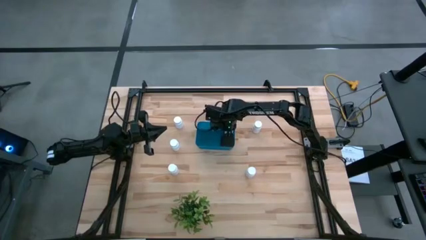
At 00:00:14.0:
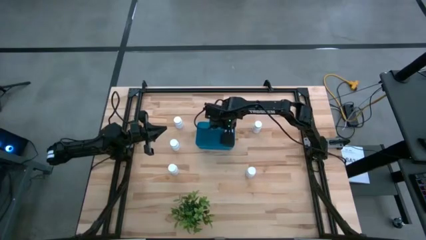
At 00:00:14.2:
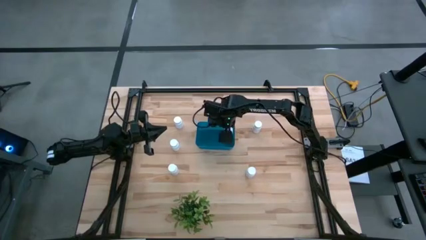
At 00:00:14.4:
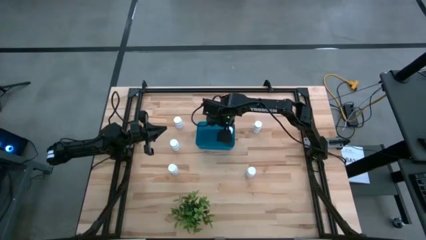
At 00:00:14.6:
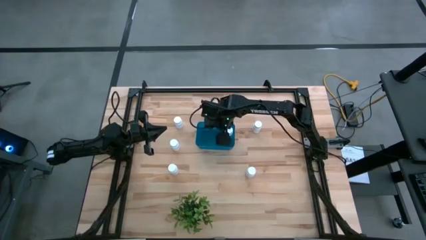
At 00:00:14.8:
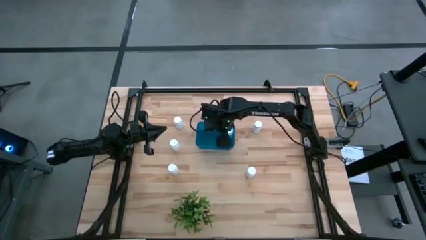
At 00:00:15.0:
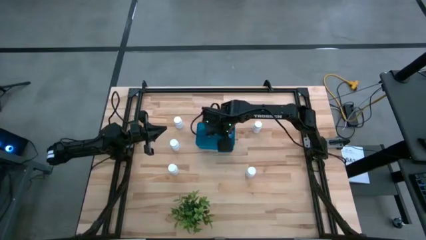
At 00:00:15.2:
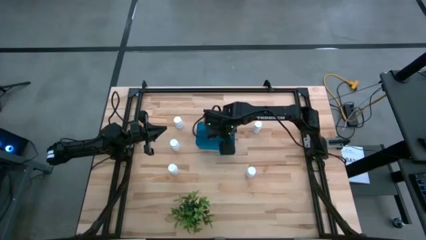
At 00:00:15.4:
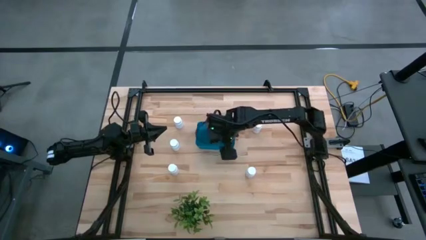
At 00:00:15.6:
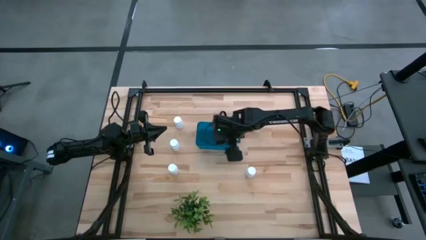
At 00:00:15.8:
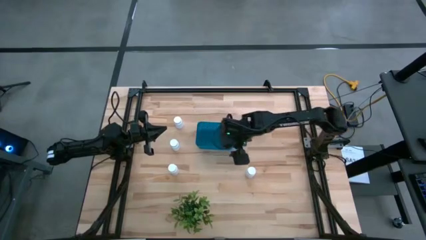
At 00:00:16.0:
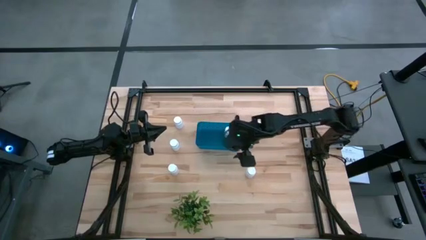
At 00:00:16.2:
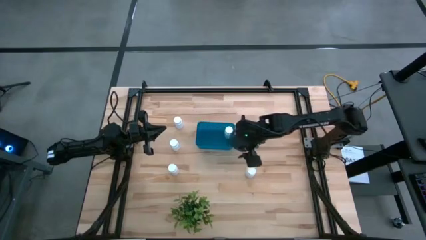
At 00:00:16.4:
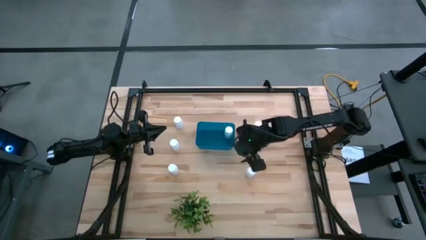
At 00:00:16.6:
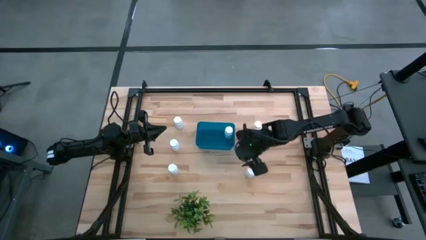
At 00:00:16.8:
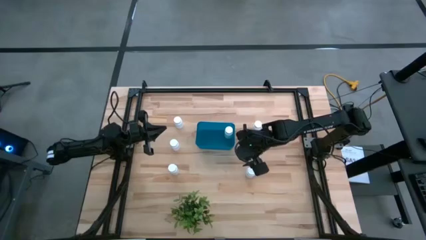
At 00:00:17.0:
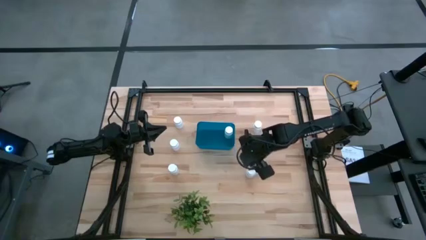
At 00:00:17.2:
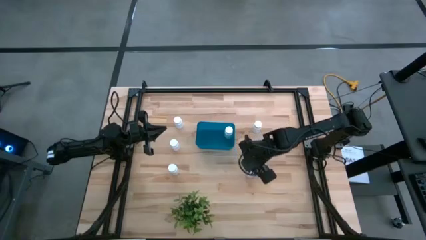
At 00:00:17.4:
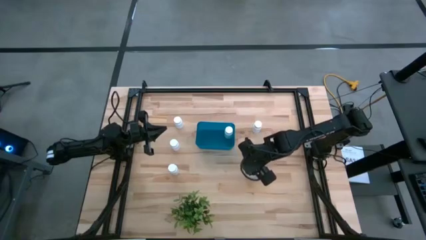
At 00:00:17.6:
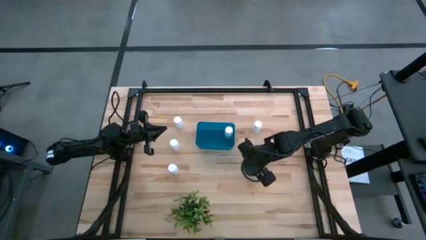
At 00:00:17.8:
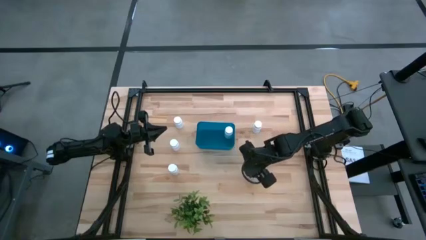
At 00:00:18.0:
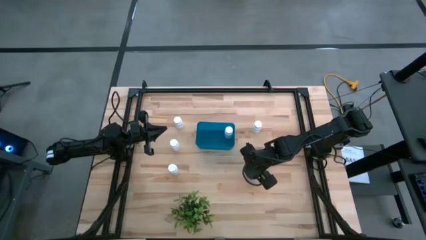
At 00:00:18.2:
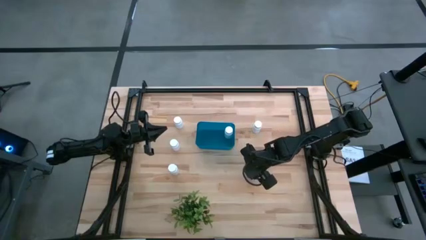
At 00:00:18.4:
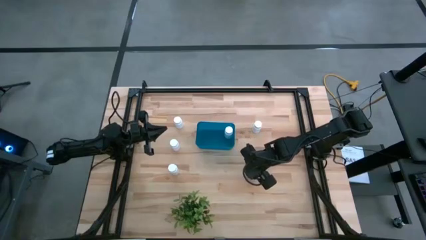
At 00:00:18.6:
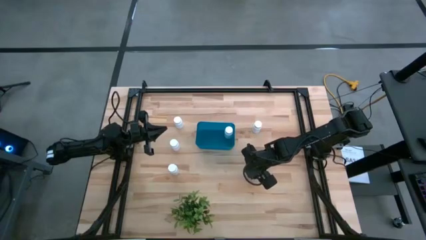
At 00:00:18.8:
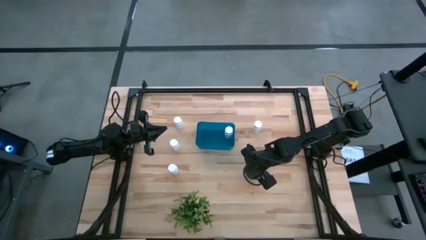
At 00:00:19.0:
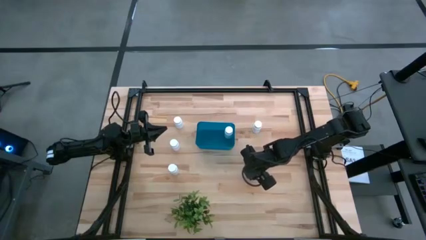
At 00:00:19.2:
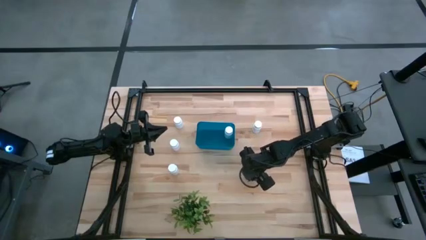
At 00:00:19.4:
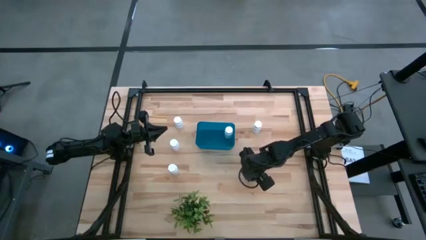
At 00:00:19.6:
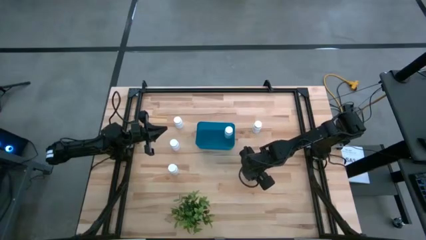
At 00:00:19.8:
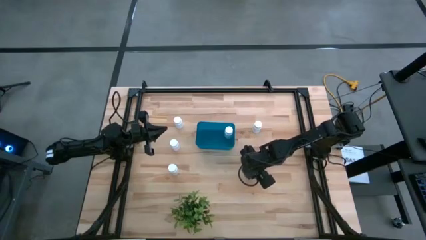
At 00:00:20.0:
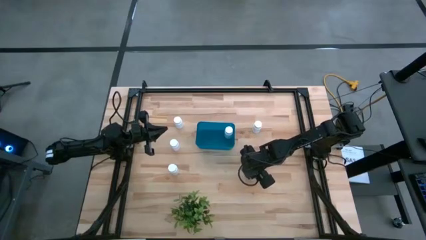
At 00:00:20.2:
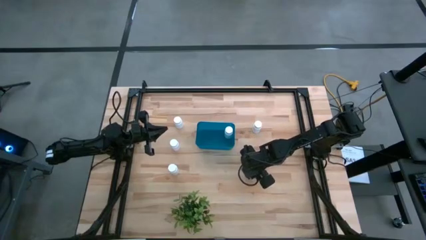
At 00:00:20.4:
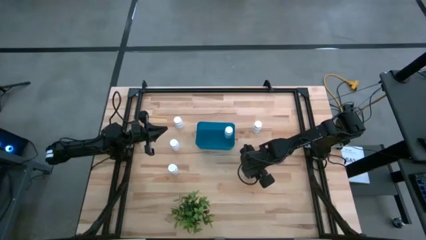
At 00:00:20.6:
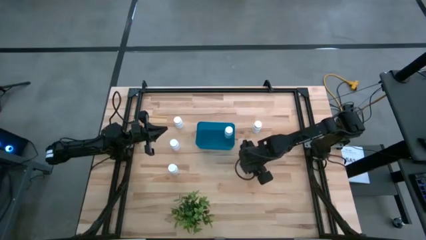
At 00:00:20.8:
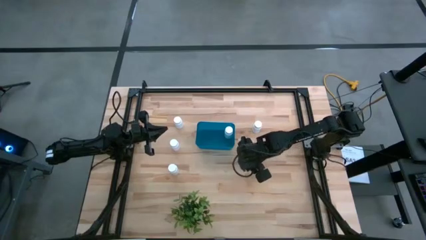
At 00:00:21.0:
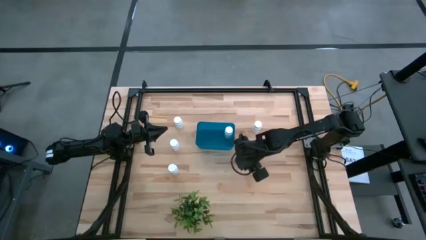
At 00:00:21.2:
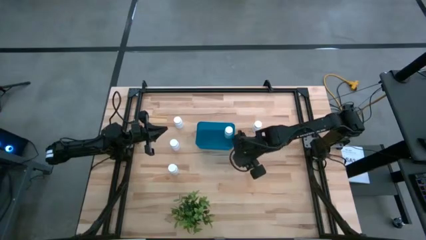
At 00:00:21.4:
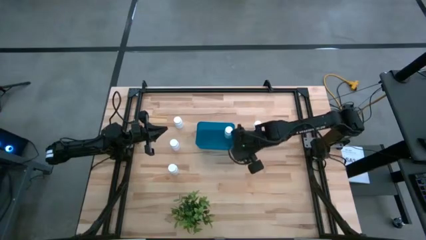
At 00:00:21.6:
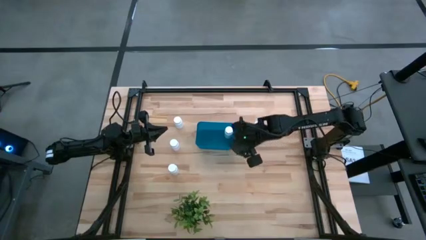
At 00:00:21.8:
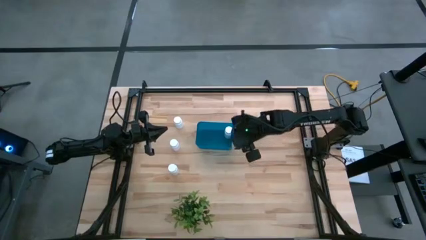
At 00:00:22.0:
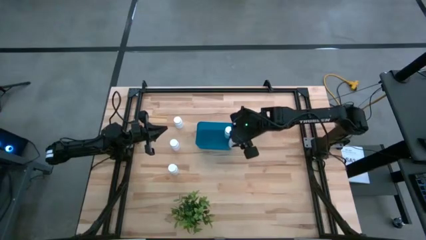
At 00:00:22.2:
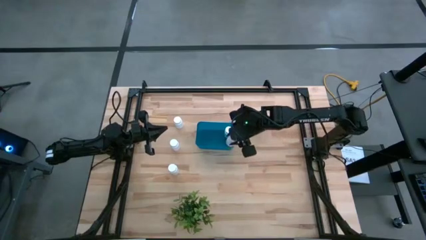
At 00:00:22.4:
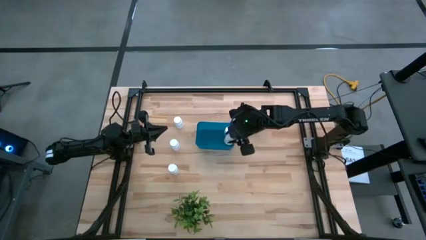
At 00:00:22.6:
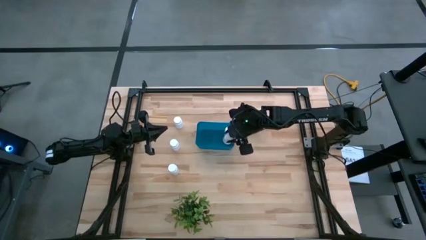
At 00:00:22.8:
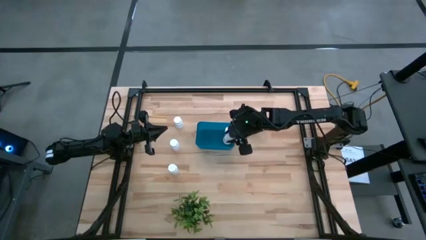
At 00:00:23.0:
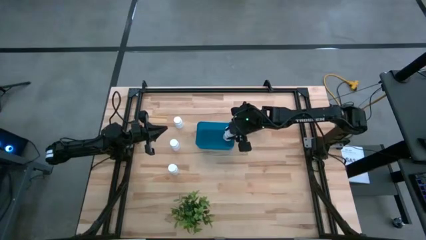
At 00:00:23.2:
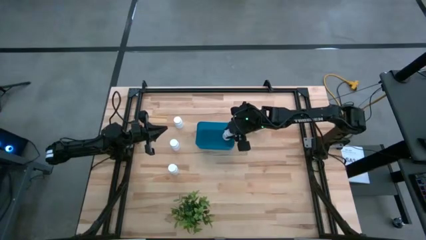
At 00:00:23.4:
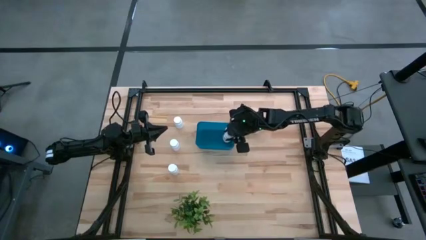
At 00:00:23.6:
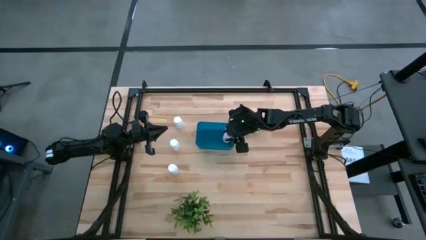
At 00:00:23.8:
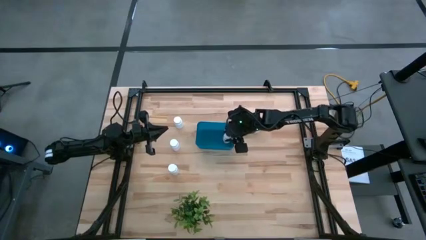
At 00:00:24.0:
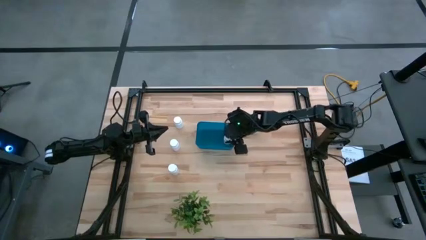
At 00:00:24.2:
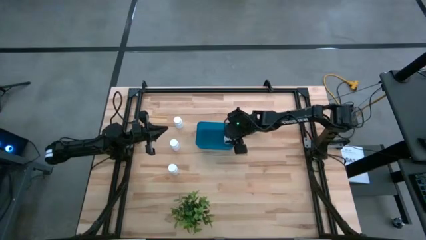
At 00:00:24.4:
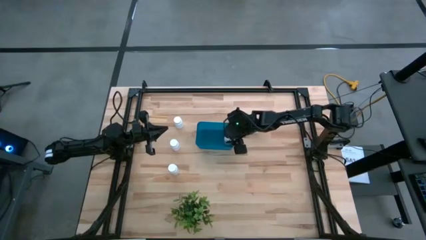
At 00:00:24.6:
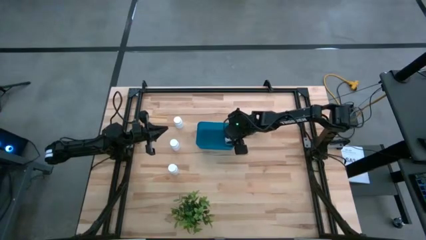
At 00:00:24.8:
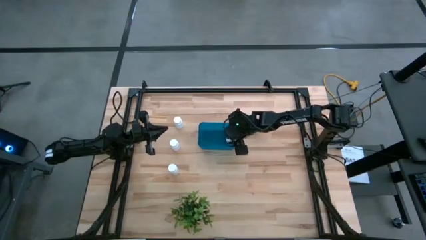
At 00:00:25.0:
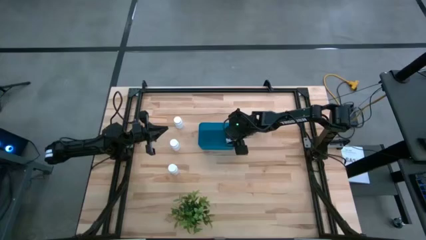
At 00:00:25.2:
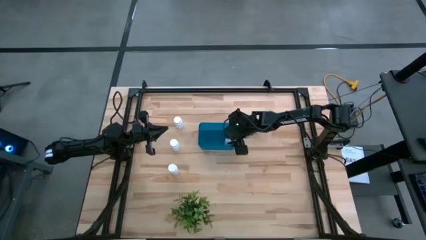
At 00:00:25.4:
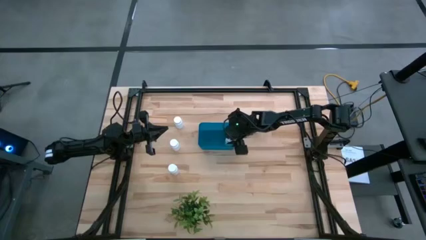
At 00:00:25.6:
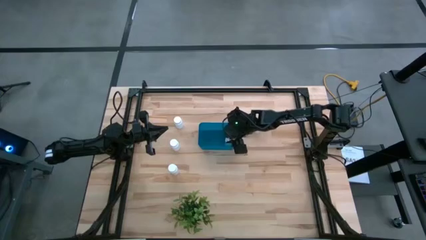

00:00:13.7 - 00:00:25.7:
Task: Pick and place pill bottles into a basket
Put the white medicine bottle into the blue bin
